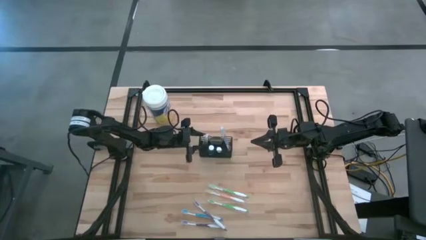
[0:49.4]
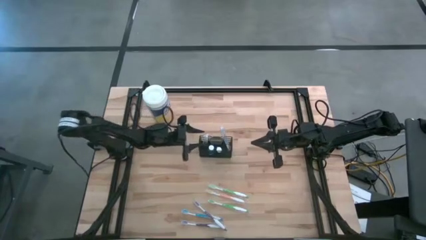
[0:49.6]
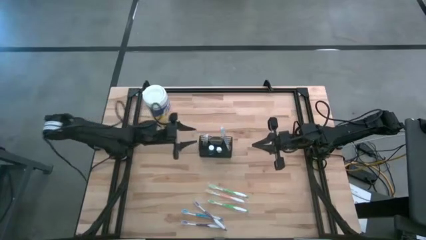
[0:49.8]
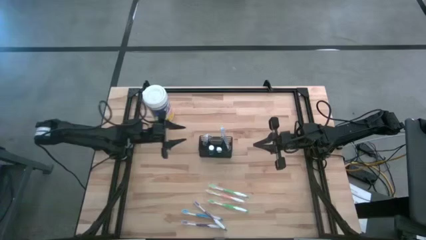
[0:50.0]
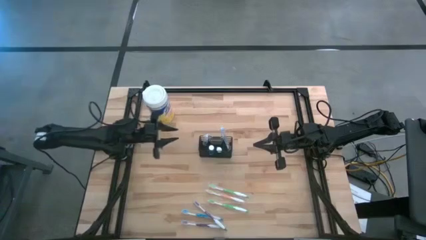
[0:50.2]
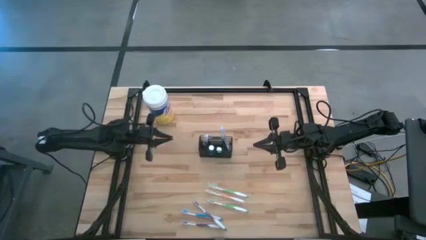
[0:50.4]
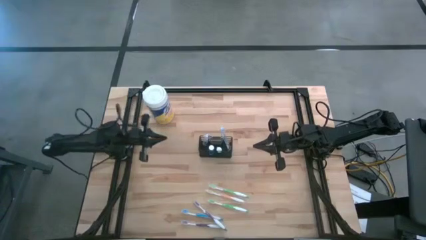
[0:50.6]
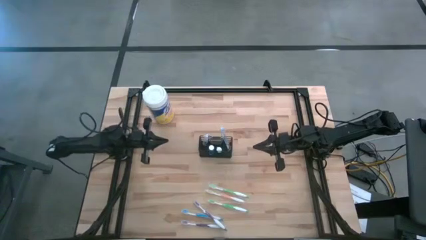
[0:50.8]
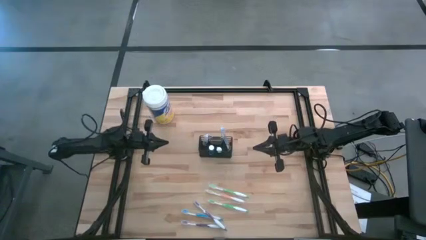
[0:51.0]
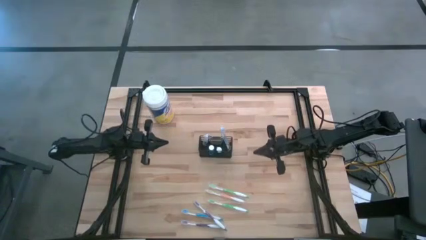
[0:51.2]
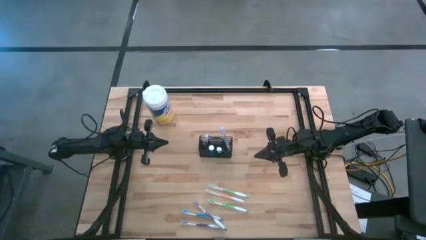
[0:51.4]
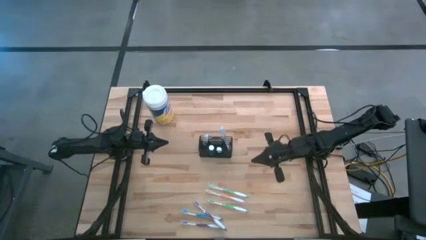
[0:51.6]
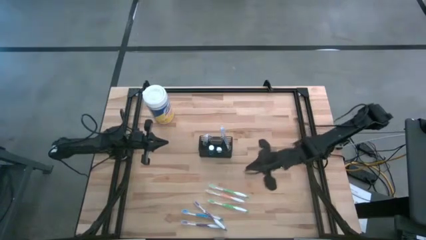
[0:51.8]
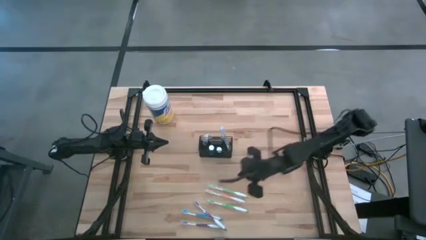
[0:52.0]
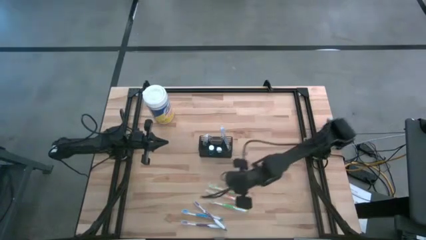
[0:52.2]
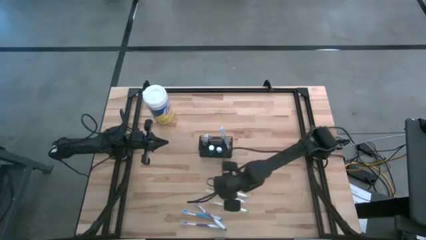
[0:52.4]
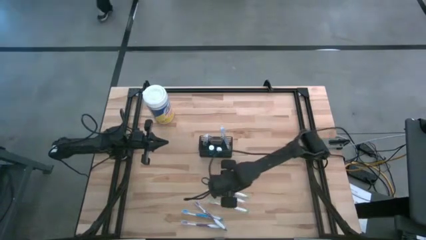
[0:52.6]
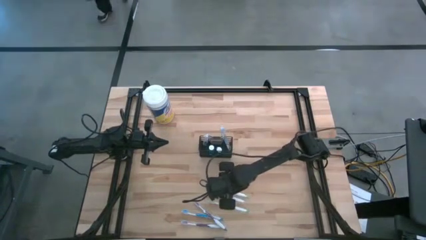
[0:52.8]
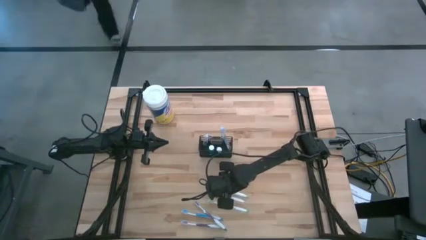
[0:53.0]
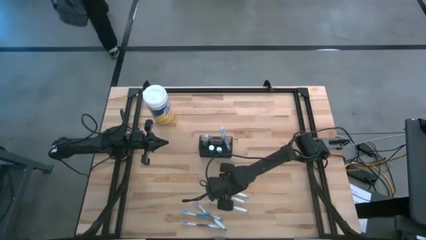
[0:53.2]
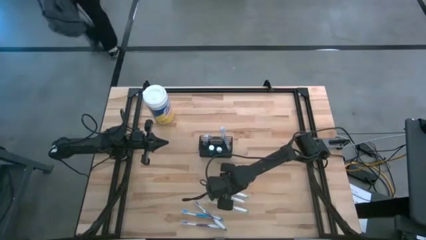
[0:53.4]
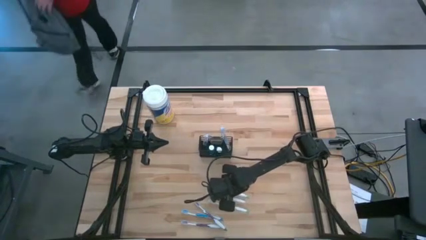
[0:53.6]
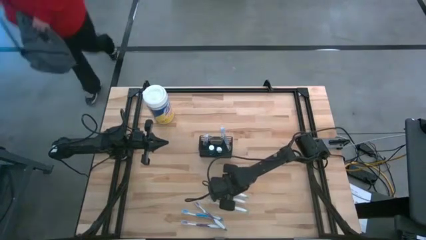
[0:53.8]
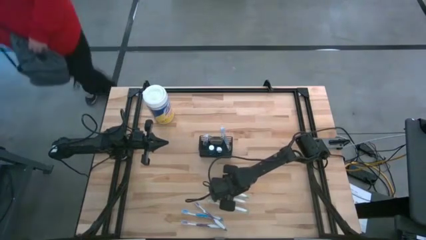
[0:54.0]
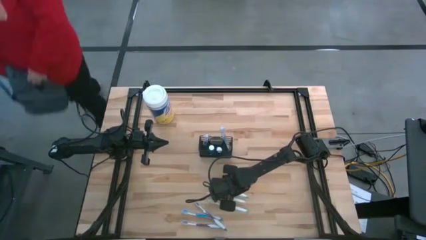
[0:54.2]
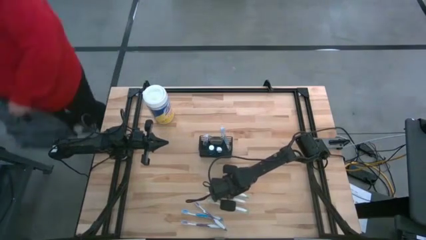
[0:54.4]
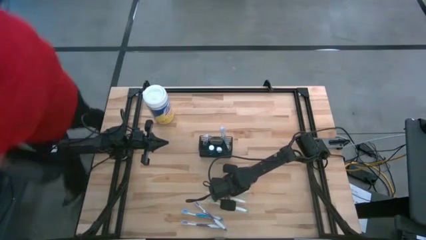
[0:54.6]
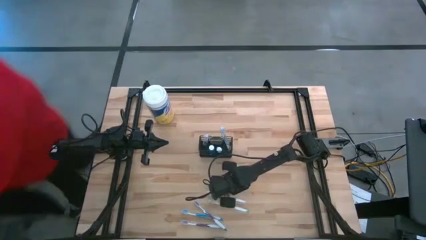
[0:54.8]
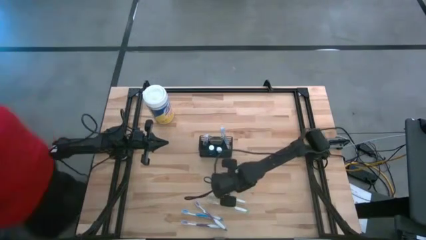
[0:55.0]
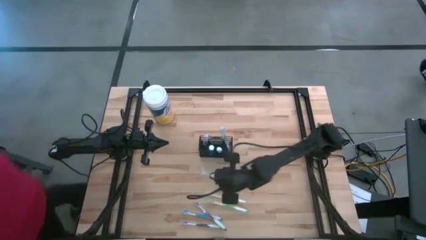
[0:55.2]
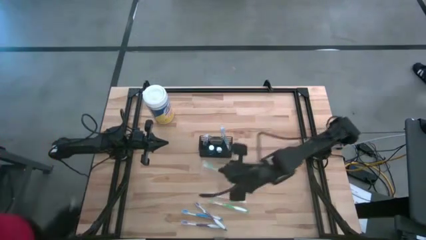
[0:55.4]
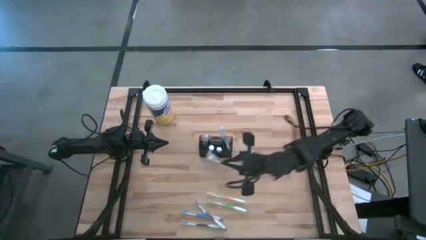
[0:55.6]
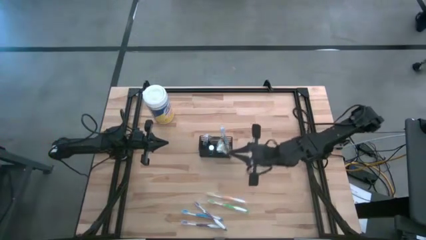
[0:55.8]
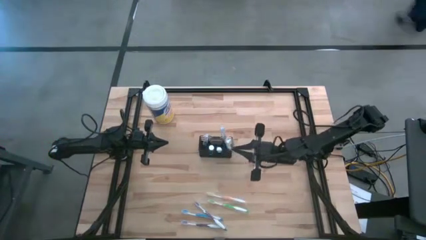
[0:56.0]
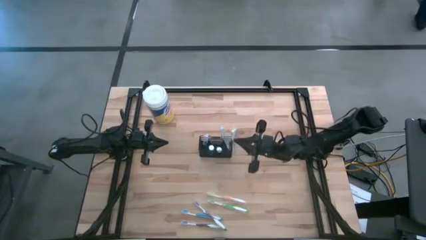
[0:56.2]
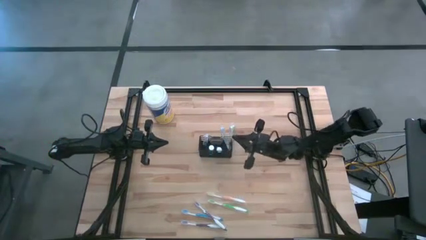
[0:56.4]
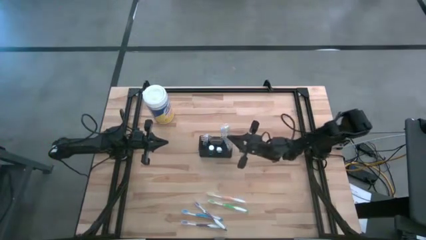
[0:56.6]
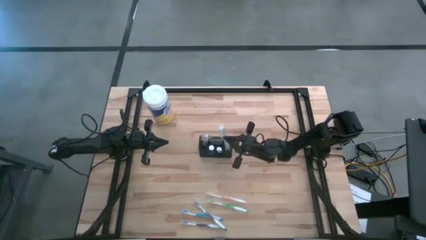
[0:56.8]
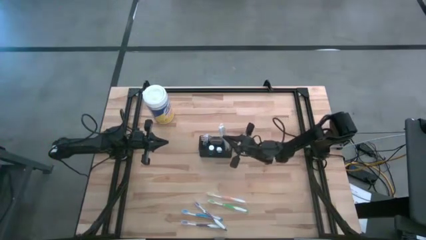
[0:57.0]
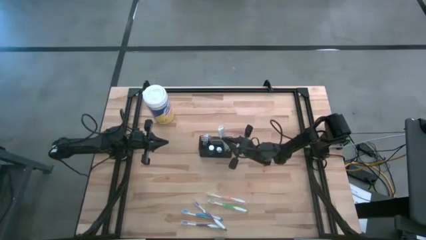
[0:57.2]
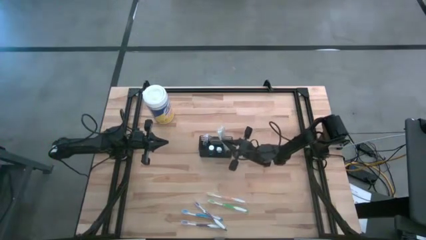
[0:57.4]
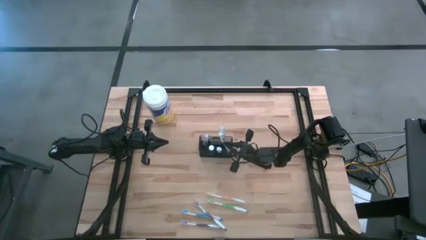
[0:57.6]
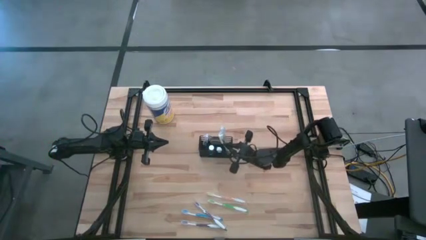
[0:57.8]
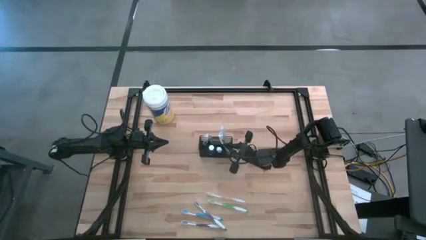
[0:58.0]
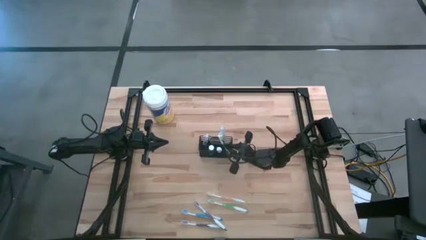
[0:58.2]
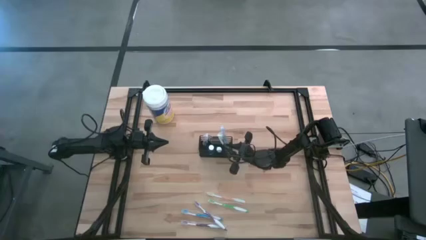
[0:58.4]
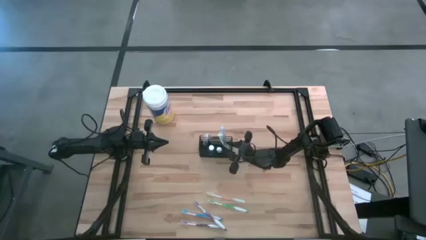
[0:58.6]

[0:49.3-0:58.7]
Task: Pick & Place toothbrushing station
Put the top green toothbrush into the wire organizer

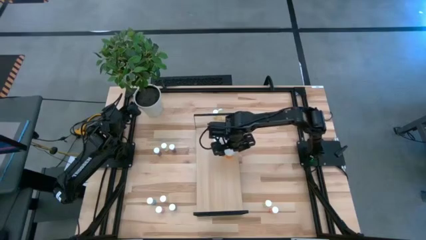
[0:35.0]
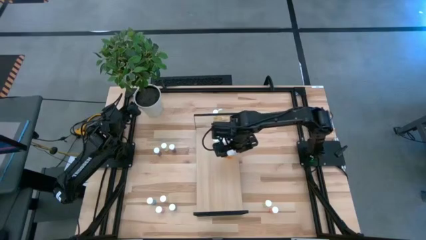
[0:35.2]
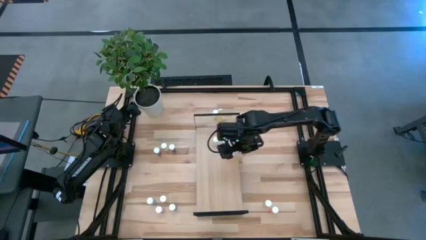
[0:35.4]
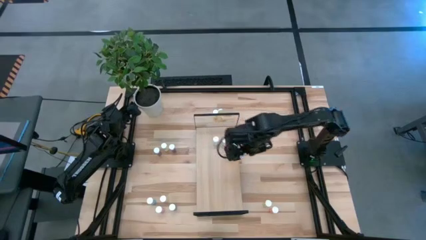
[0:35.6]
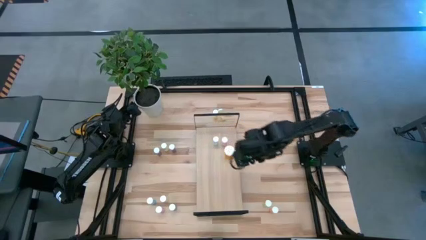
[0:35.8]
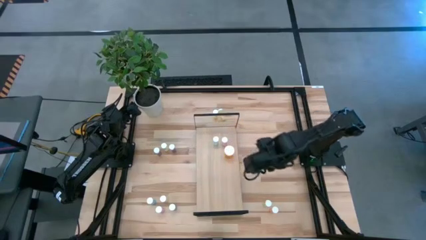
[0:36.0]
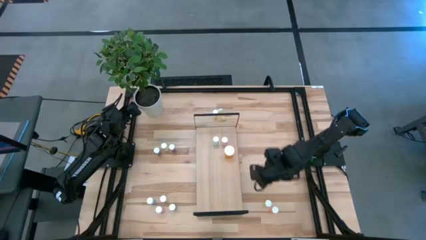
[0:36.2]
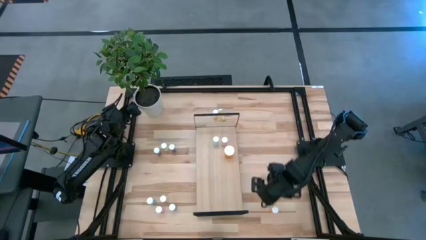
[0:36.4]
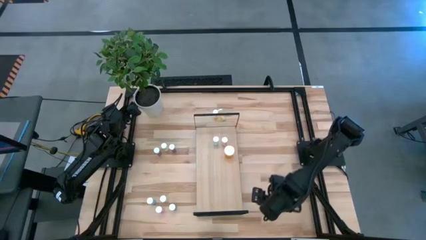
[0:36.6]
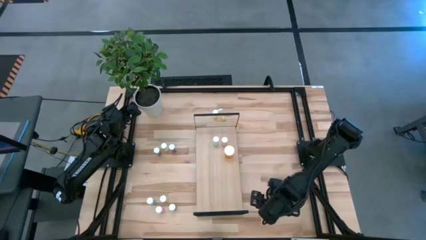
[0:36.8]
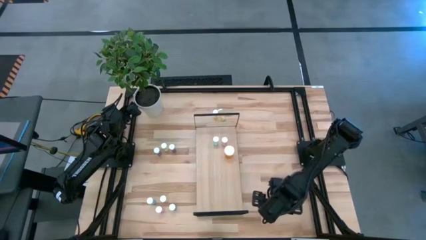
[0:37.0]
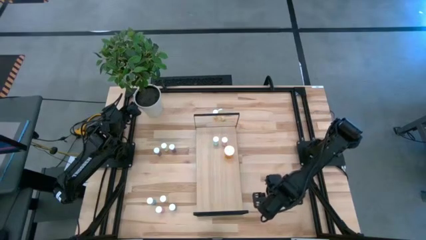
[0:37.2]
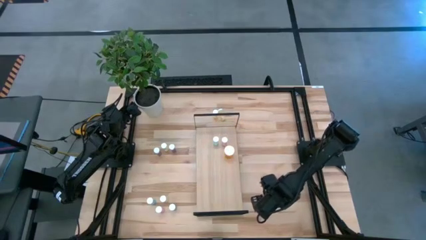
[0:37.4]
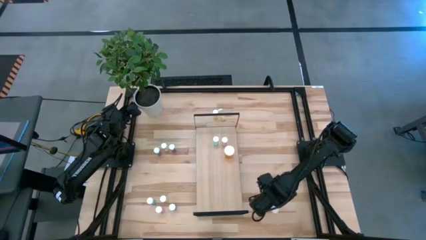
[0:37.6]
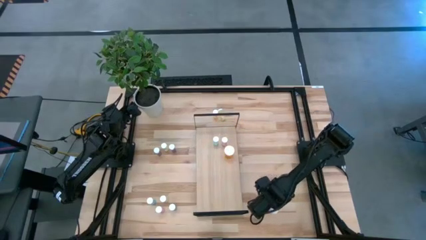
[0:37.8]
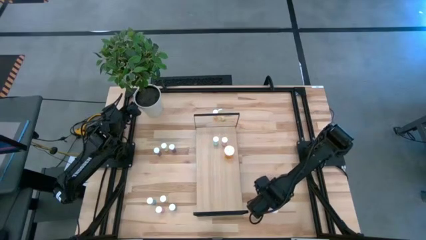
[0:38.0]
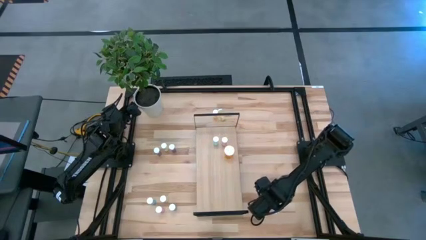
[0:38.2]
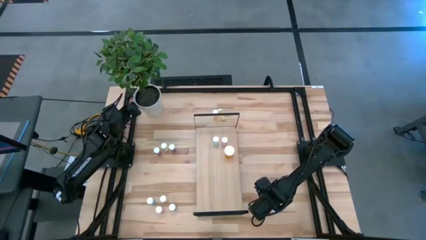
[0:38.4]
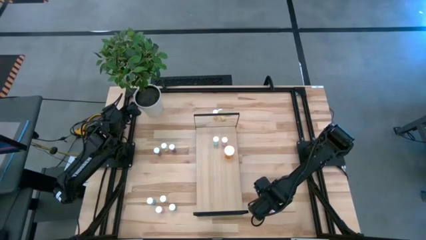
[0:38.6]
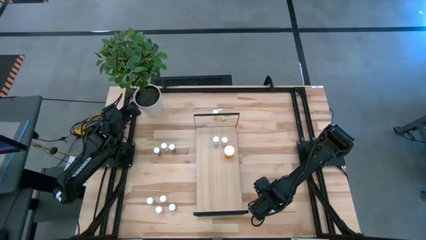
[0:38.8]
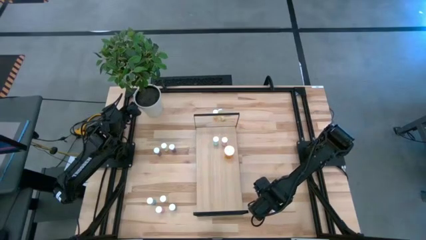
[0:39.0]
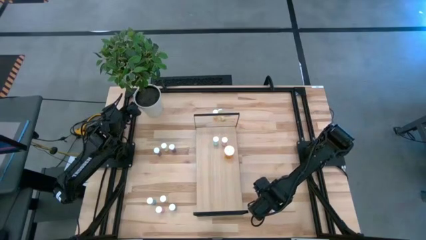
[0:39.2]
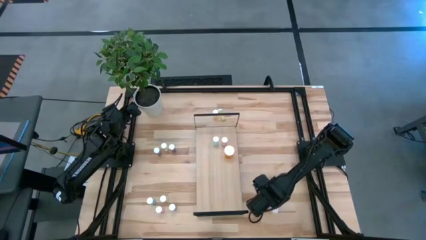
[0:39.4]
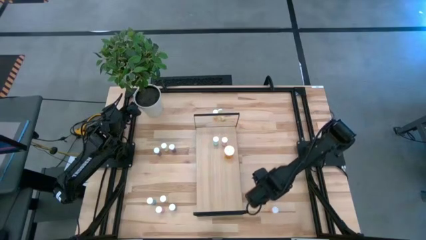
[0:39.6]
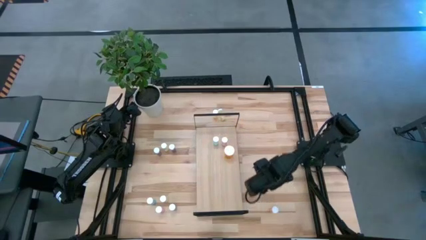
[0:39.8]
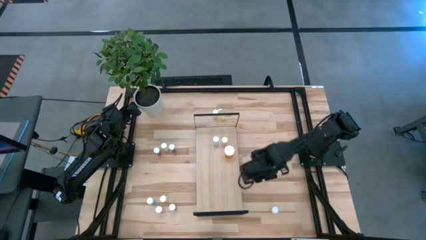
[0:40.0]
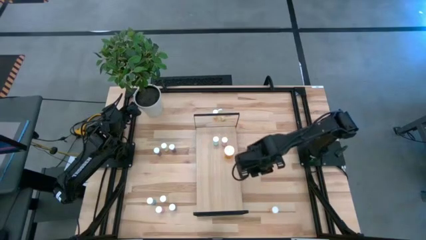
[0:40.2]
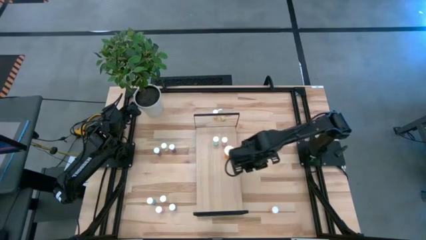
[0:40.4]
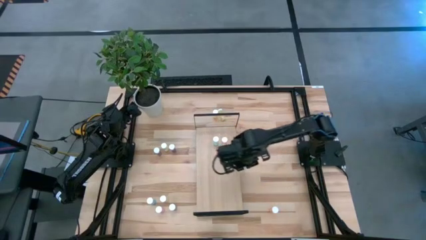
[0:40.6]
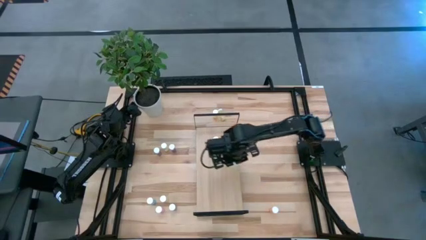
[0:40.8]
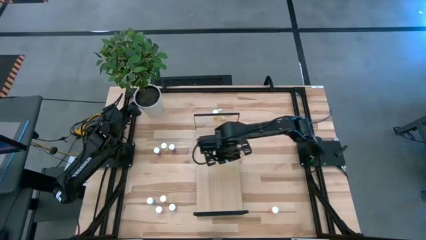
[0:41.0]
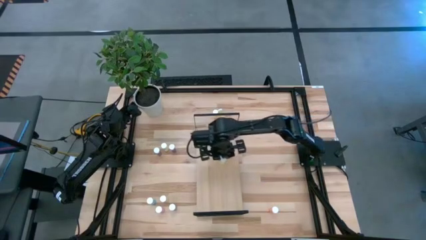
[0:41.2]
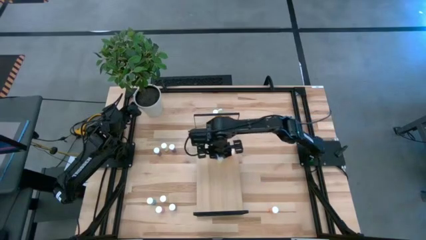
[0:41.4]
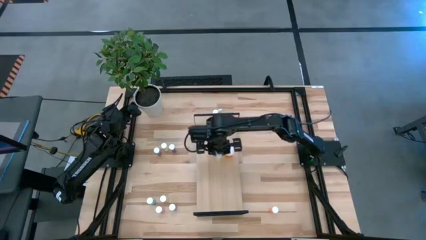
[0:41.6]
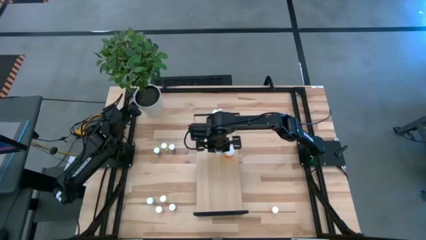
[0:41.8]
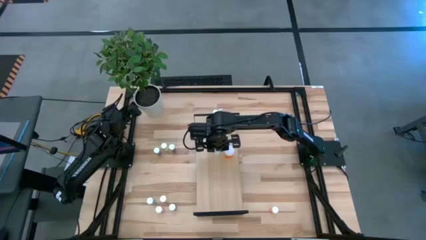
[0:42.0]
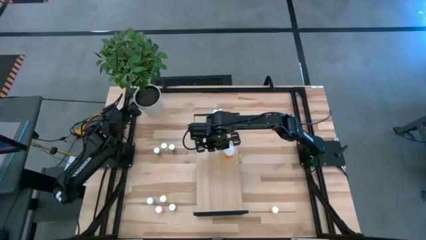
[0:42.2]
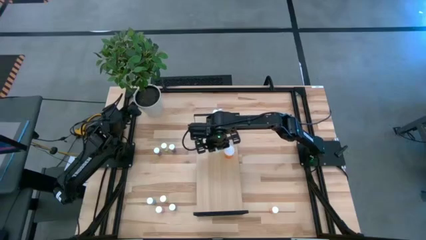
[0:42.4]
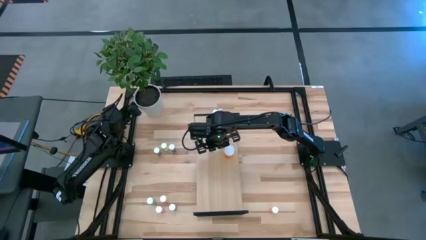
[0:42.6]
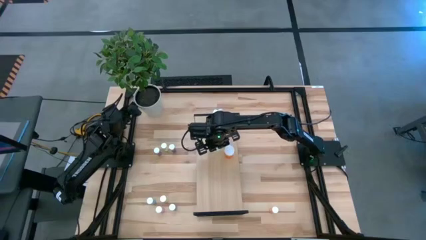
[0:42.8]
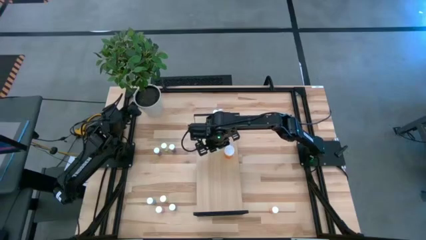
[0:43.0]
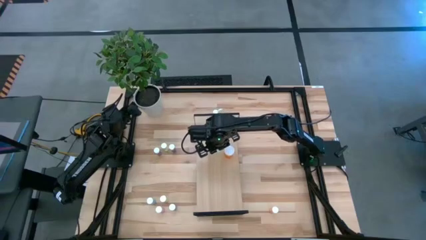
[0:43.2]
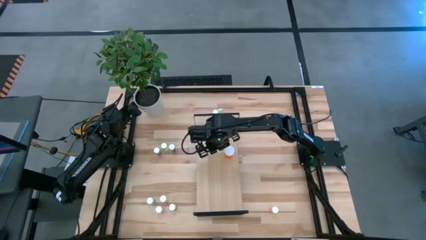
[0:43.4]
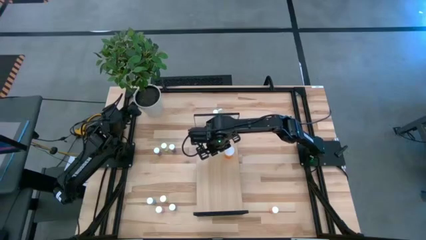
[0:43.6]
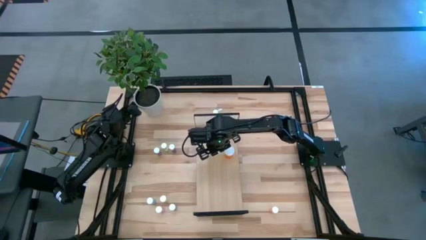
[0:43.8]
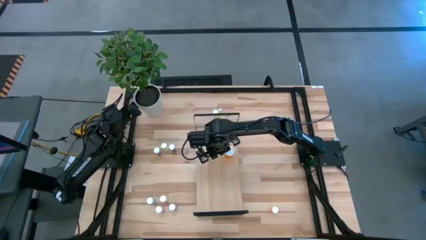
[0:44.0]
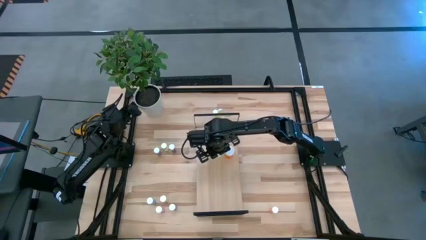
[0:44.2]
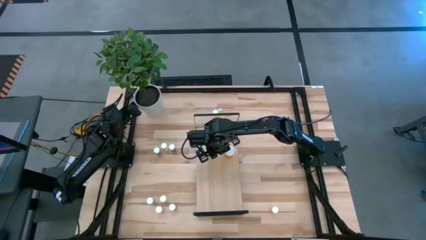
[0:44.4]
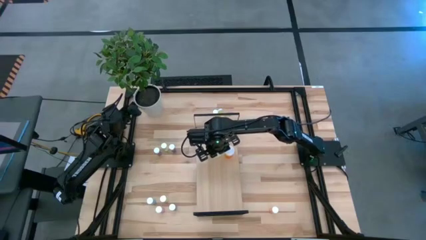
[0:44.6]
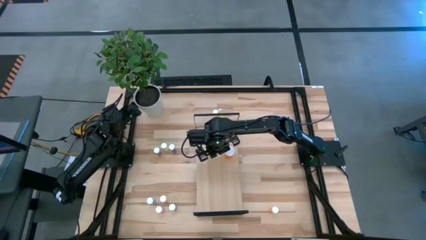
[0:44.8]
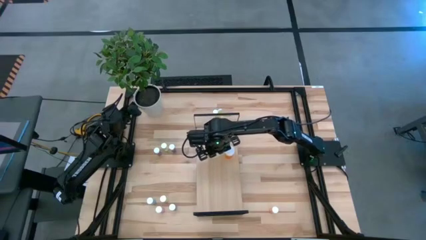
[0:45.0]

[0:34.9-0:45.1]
Task: Pick and place medicine bottles onto shelf by color
Put the yellow pill bottle on the shelf
